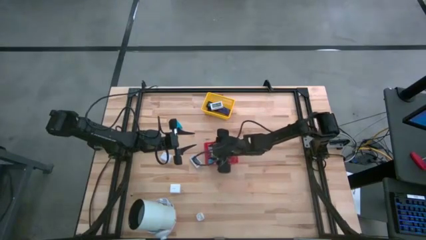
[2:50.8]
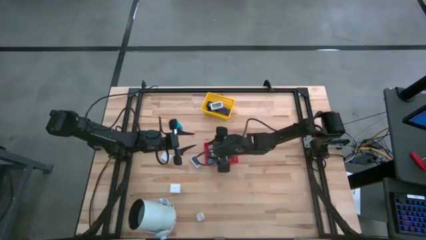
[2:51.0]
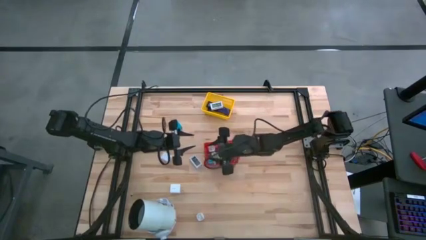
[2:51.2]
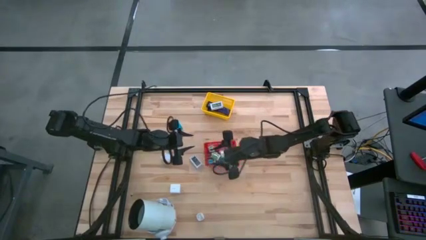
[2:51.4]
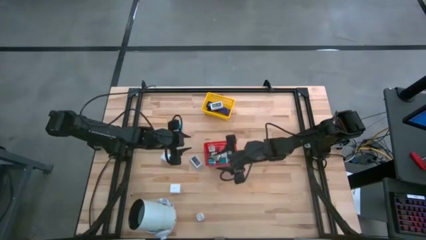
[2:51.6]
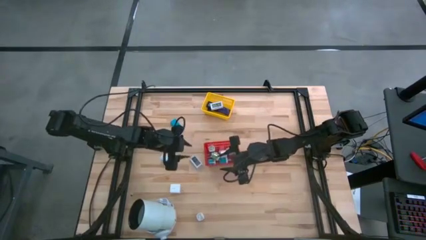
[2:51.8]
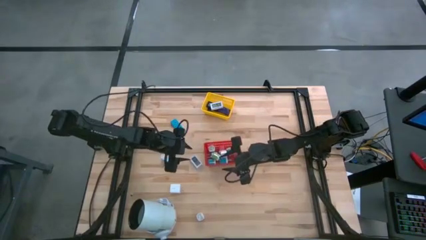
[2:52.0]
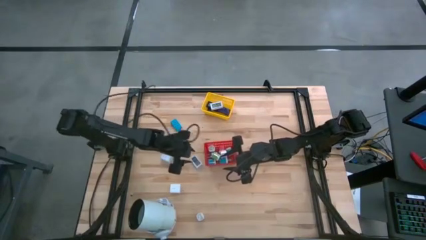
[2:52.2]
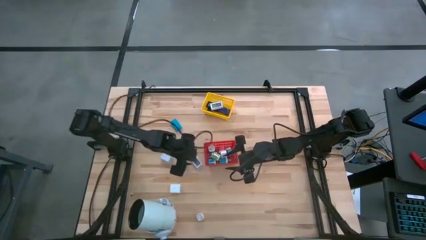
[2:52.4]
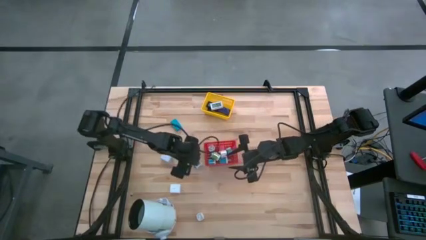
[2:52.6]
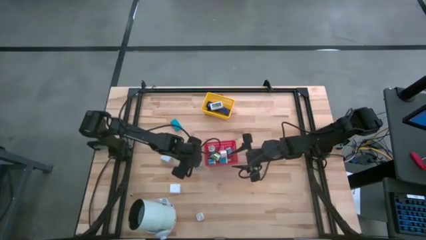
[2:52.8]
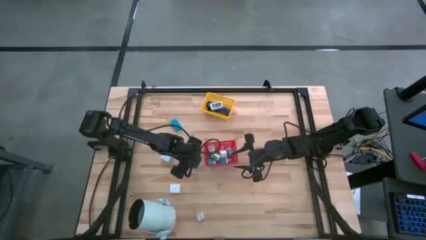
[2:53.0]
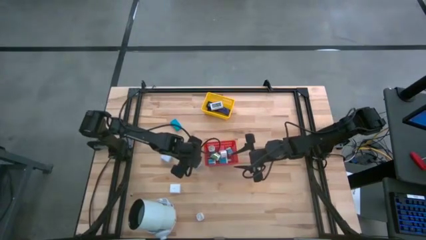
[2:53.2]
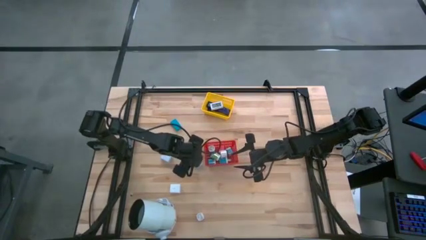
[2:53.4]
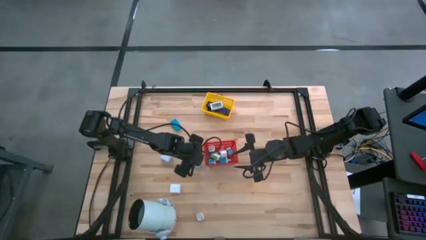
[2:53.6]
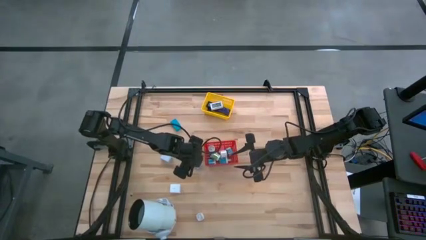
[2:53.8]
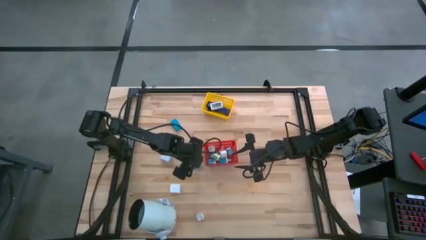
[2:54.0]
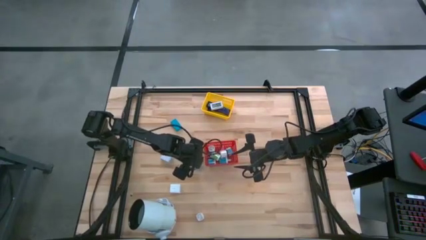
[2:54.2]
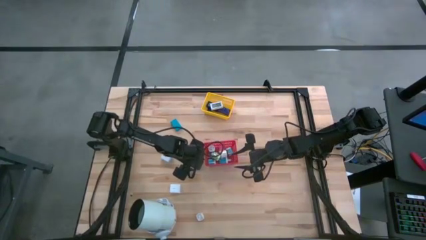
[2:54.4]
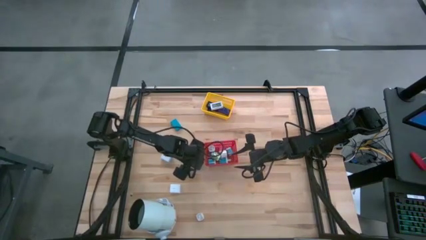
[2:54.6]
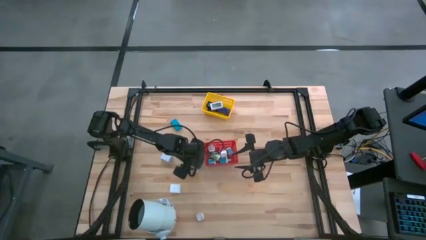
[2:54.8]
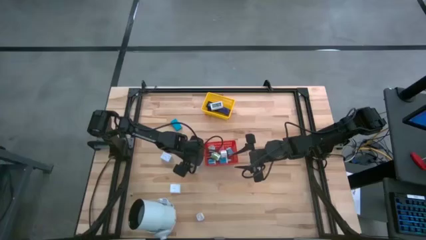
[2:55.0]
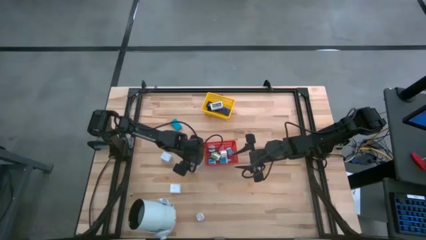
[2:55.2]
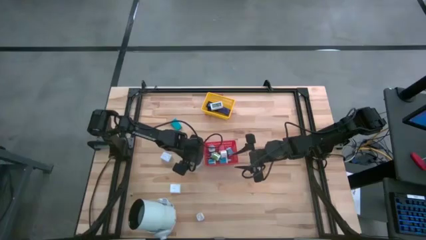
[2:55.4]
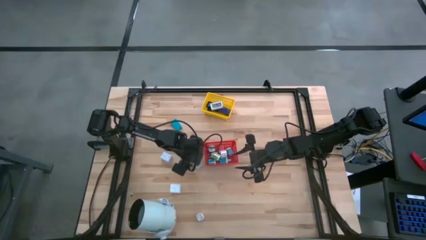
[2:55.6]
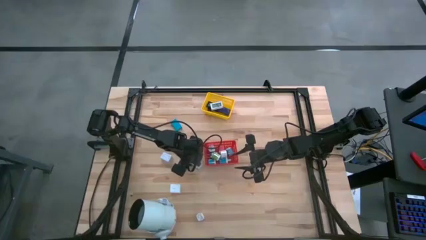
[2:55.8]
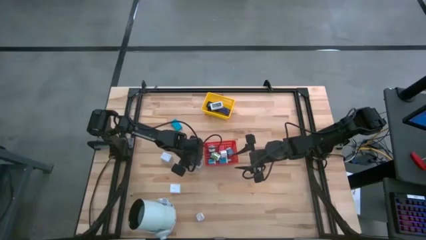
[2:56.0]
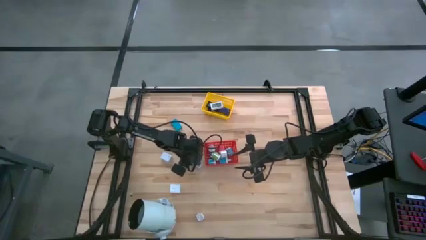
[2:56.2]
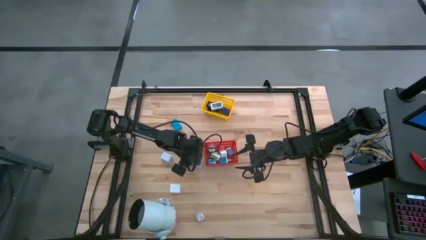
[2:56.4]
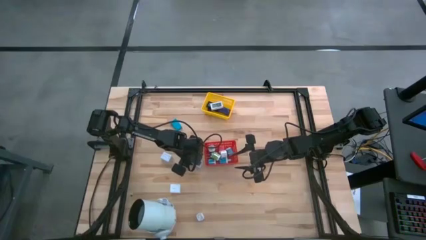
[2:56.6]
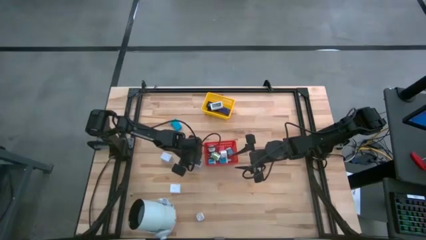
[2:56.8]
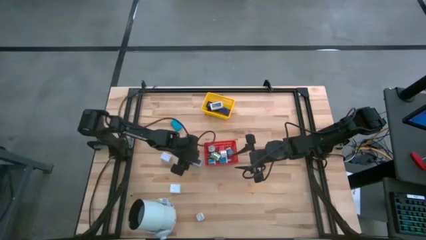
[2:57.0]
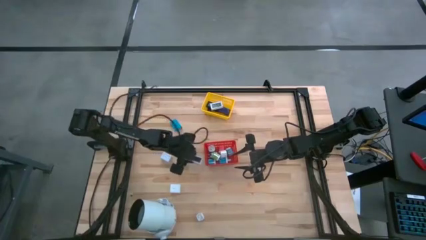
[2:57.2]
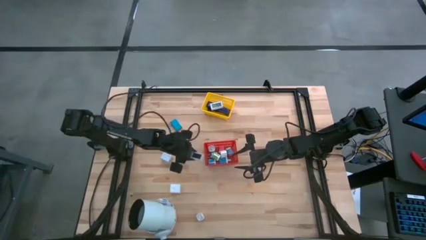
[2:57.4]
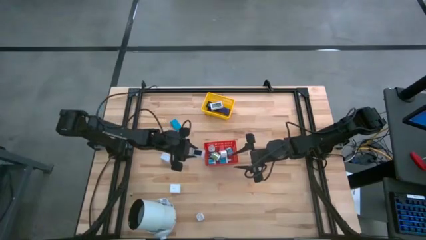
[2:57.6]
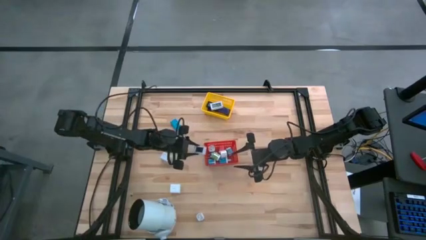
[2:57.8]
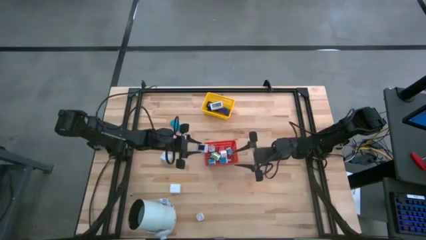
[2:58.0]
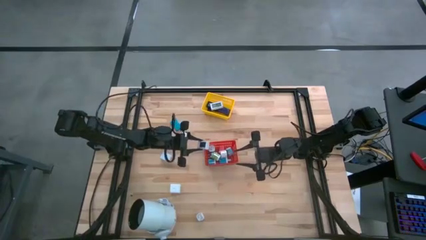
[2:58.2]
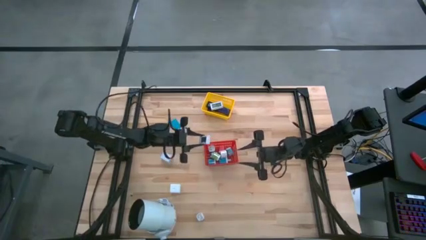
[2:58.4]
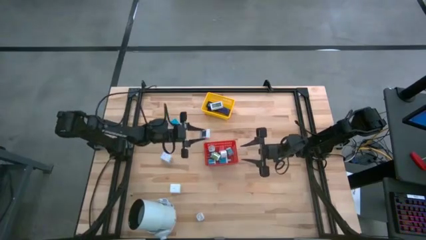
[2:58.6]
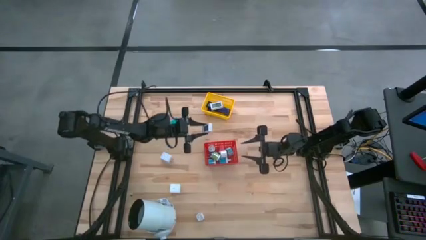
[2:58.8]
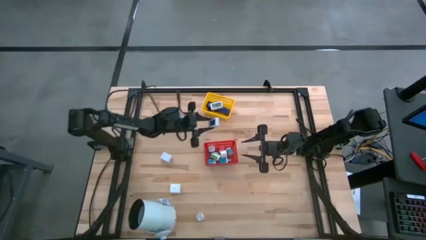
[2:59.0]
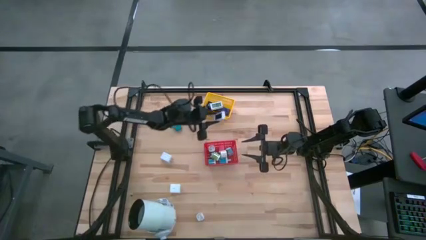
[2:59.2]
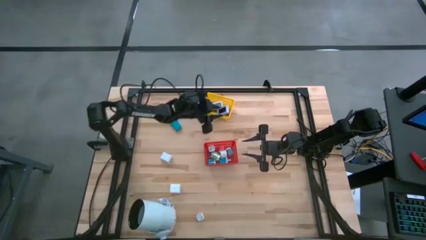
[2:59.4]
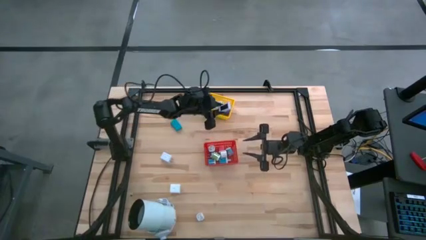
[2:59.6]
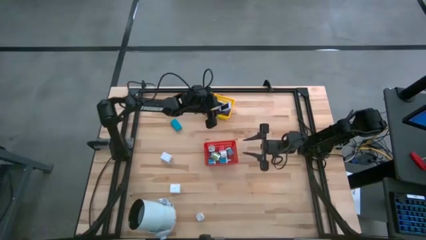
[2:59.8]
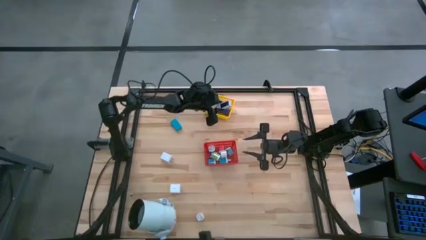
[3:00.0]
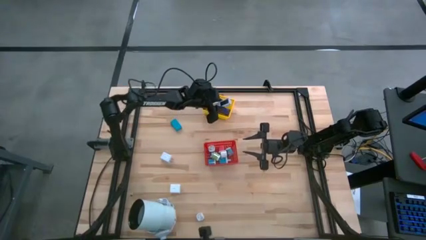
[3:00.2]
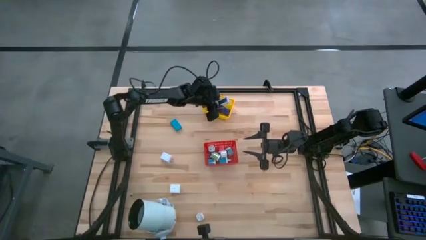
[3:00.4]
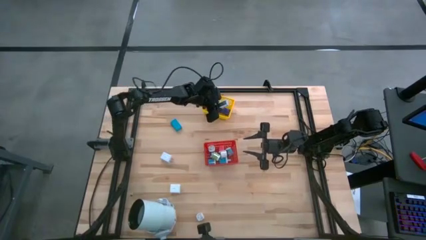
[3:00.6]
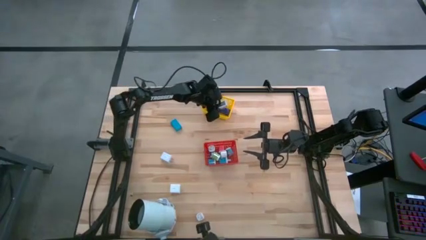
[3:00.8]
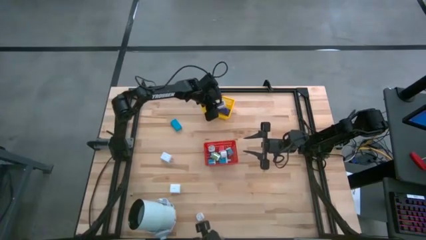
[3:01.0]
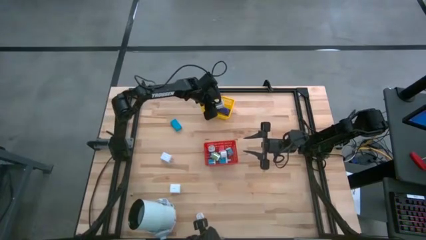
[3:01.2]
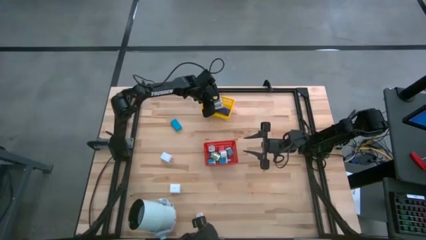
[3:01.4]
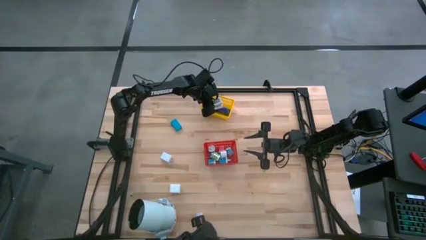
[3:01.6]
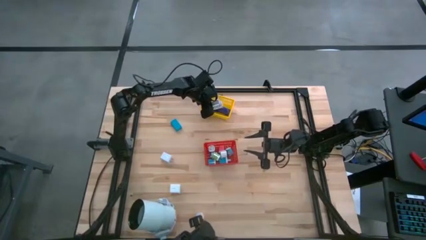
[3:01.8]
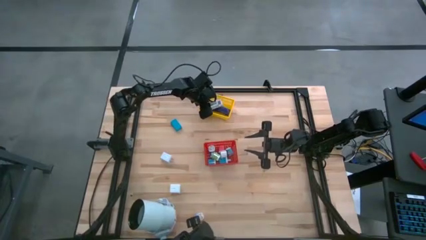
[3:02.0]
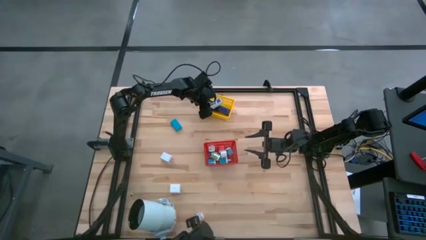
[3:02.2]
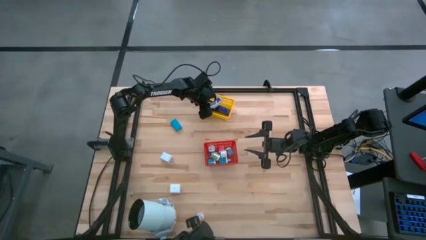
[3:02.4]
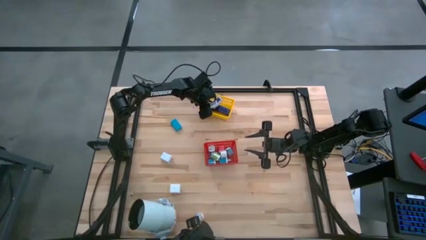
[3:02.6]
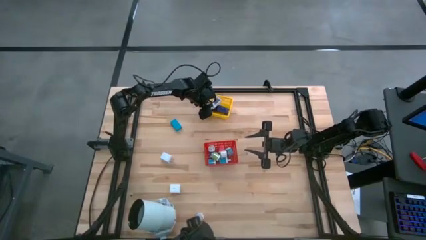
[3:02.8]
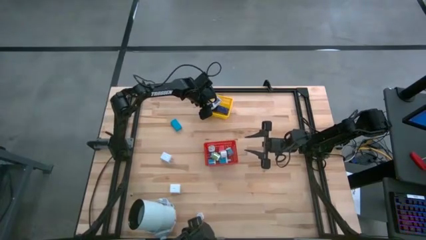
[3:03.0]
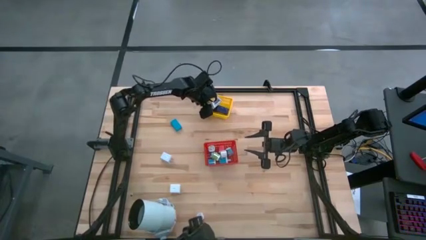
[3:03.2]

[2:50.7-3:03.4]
Task: Pick & Place Office items
Put the white digital clock into the yellow bin

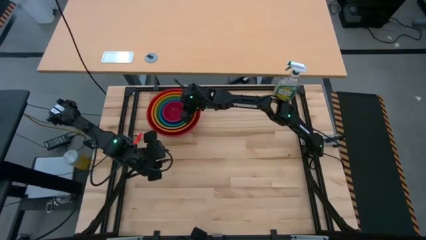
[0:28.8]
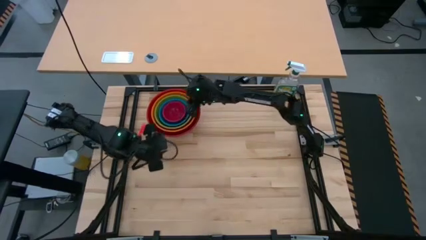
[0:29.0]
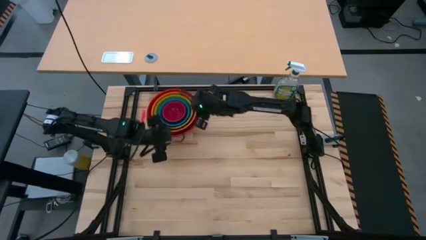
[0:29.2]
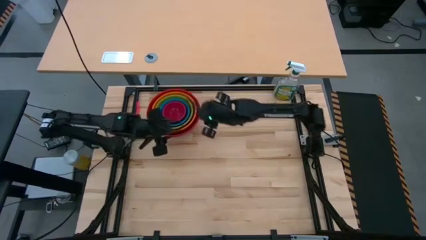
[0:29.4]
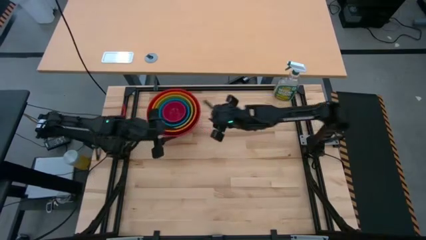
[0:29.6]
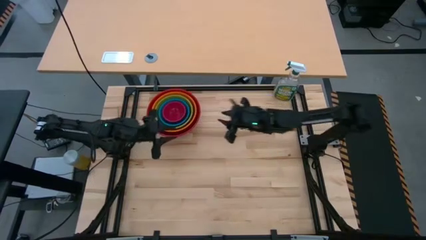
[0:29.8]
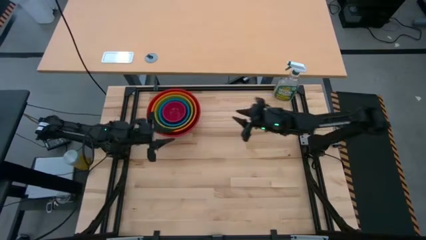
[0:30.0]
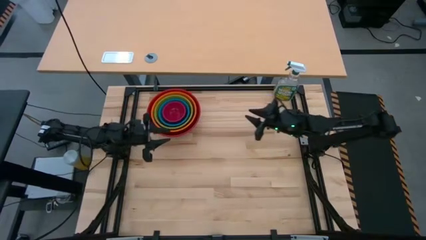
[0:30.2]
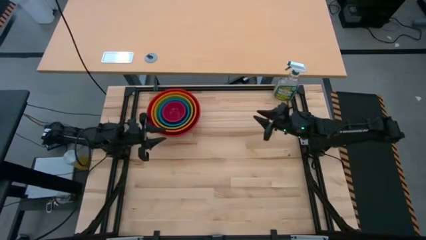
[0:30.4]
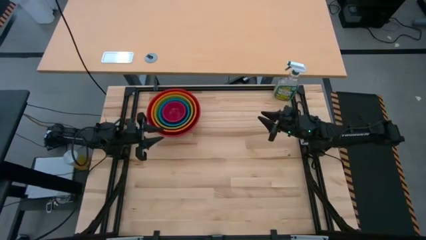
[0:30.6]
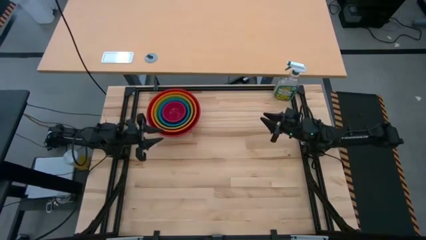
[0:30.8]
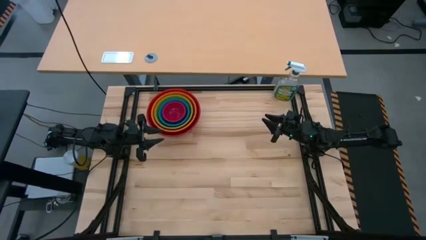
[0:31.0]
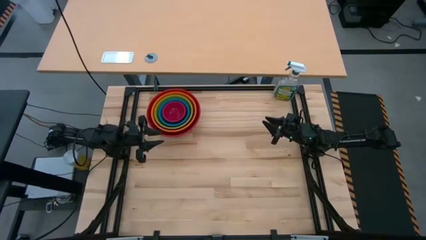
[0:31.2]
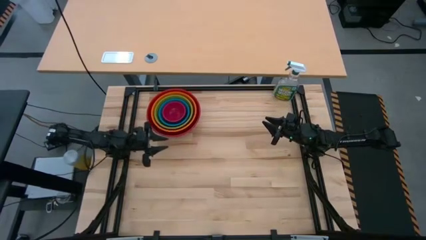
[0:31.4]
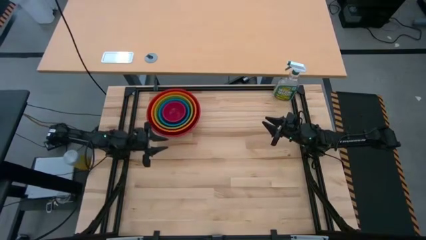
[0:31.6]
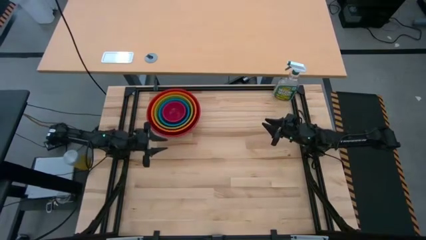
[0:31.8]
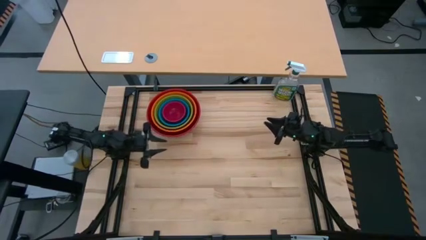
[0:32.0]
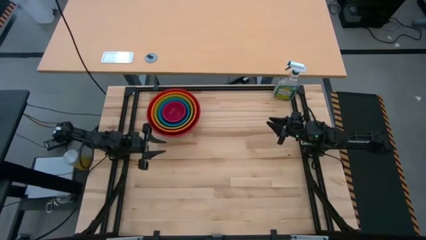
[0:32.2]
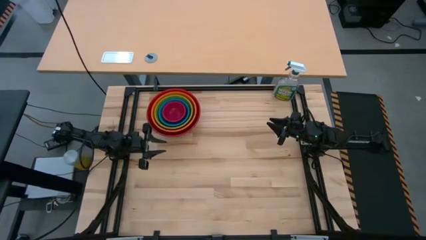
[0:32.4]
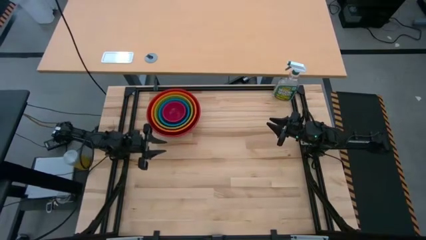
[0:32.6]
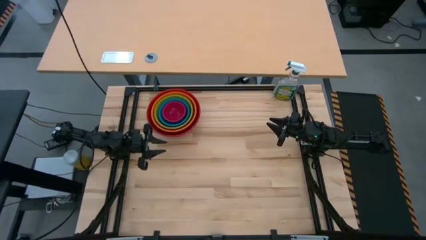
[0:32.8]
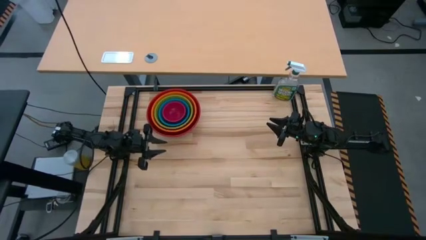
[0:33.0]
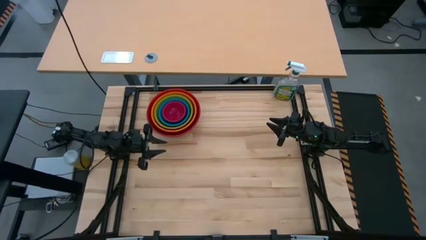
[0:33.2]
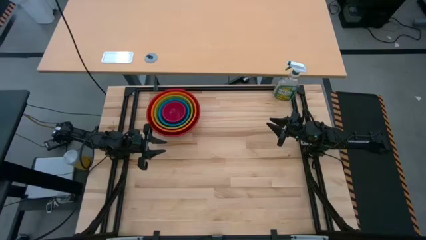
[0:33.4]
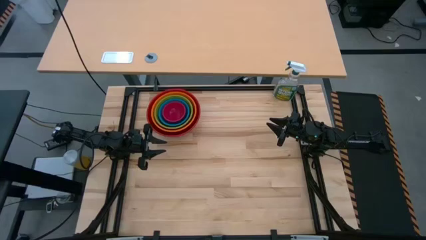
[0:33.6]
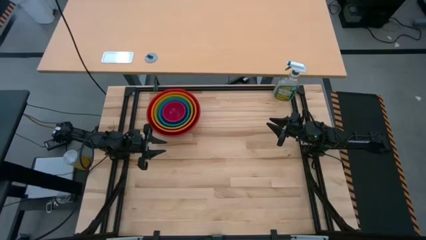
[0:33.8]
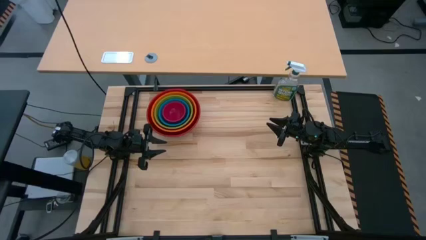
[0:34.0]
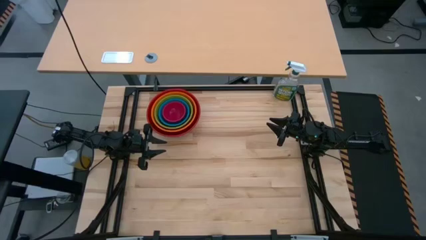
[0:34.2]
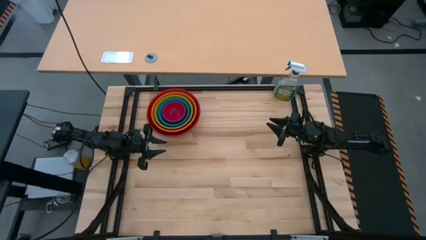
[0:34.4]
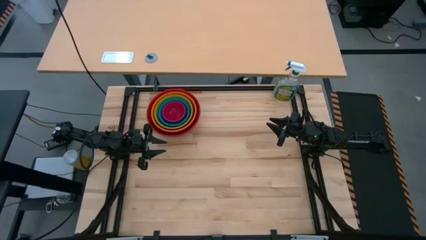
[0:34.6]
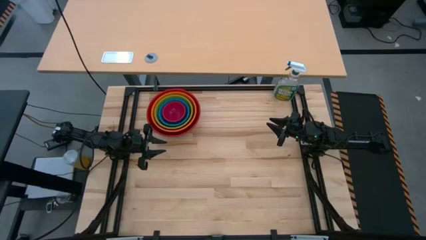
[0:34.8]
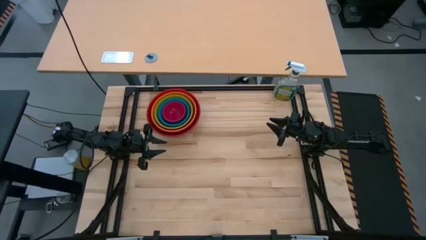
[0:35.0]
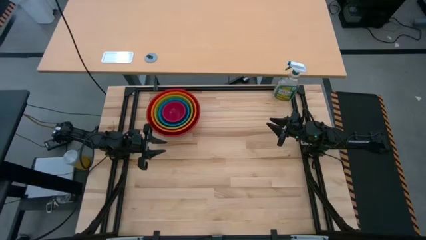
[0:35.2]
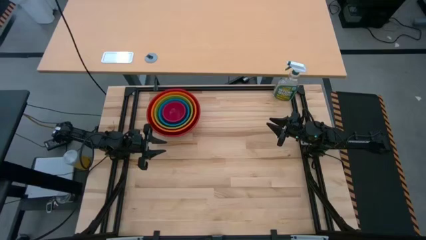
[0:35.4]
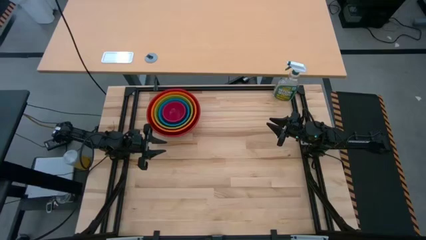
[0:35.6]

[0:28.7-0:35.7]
Task: Nest bowls inside each other by size order
Return to Home Position
